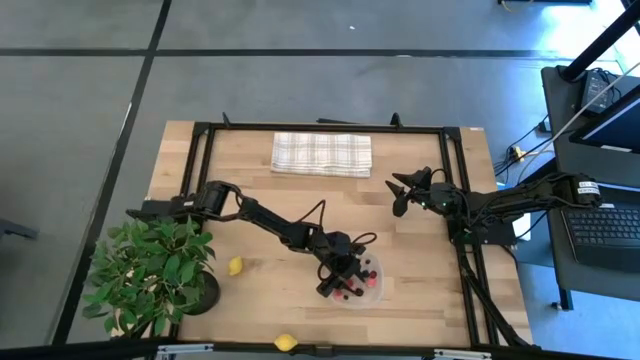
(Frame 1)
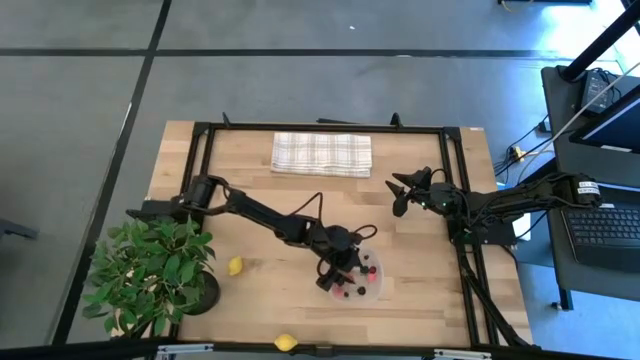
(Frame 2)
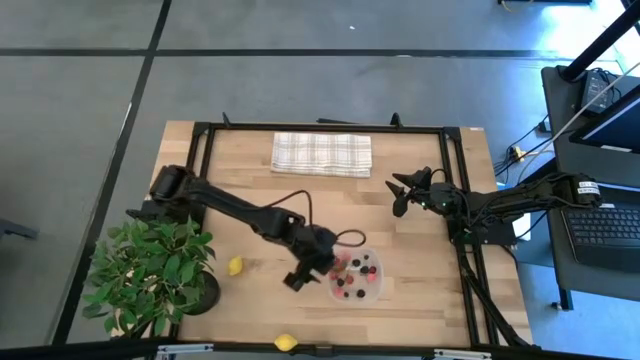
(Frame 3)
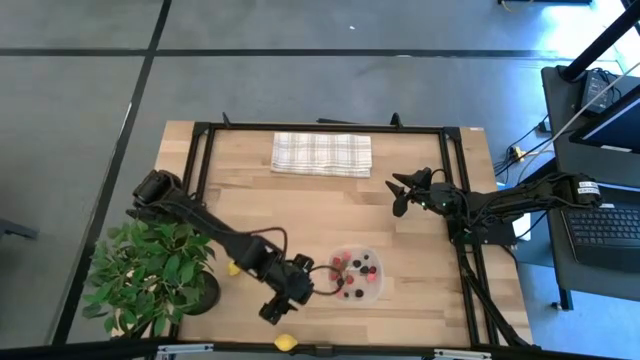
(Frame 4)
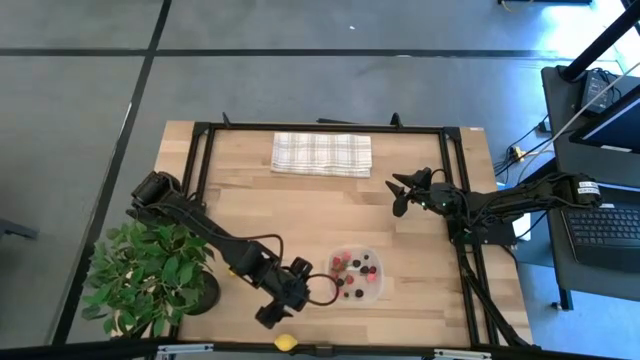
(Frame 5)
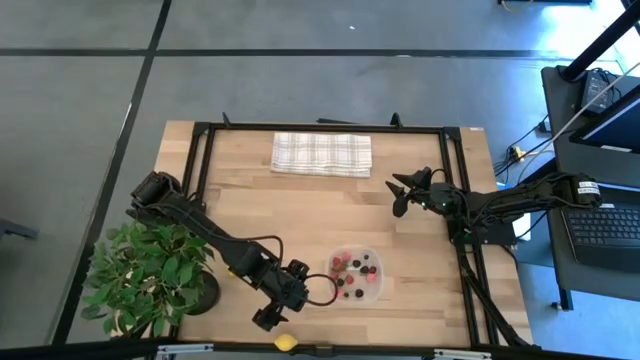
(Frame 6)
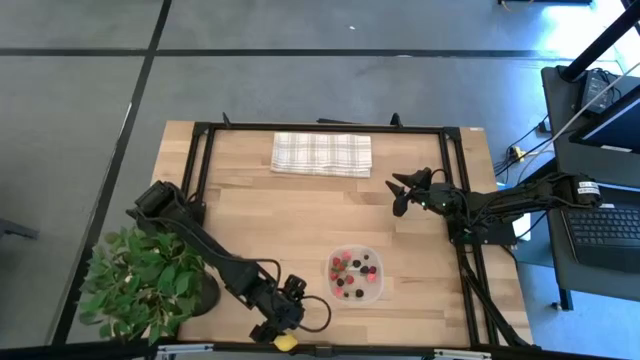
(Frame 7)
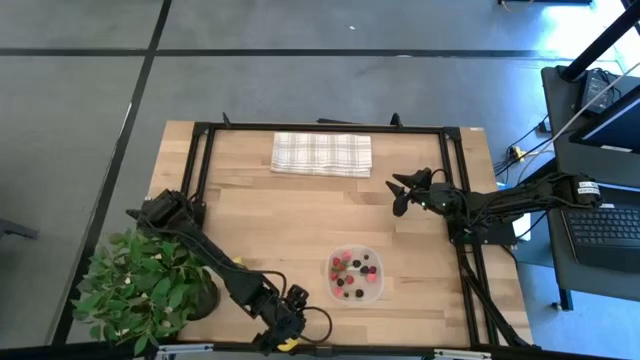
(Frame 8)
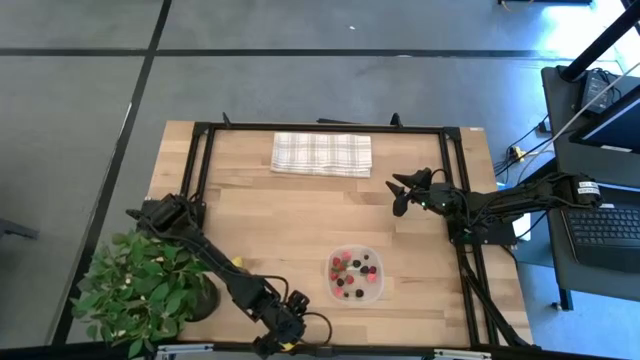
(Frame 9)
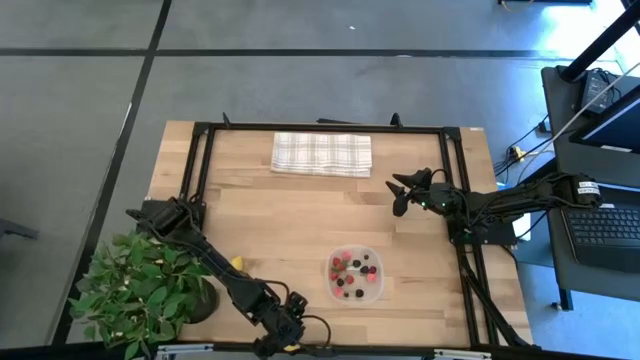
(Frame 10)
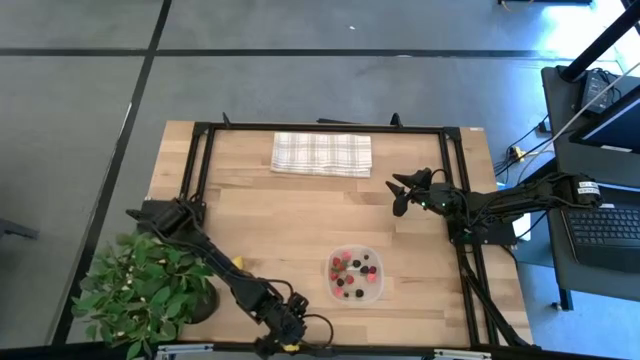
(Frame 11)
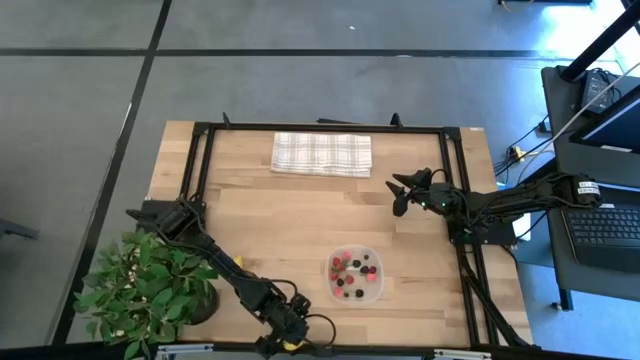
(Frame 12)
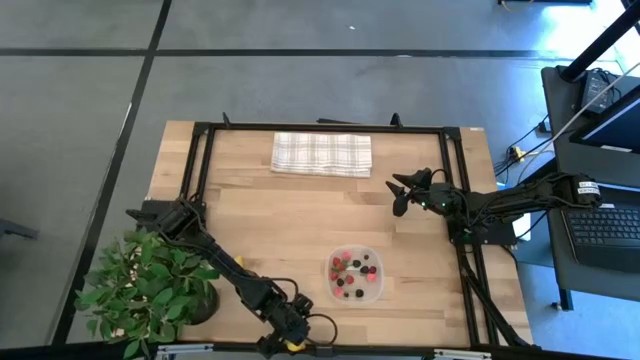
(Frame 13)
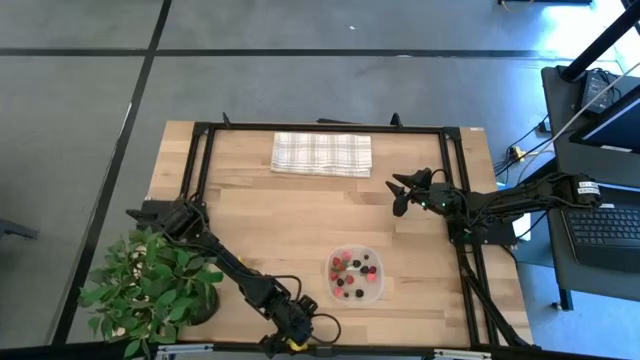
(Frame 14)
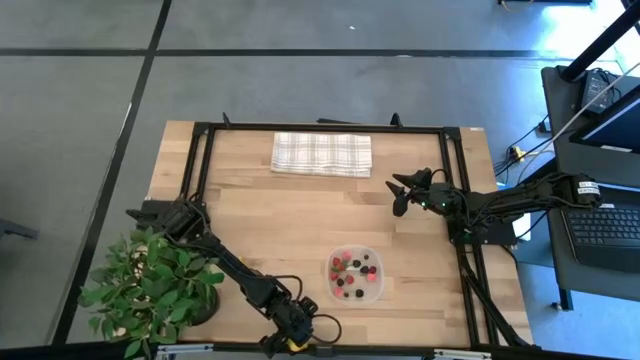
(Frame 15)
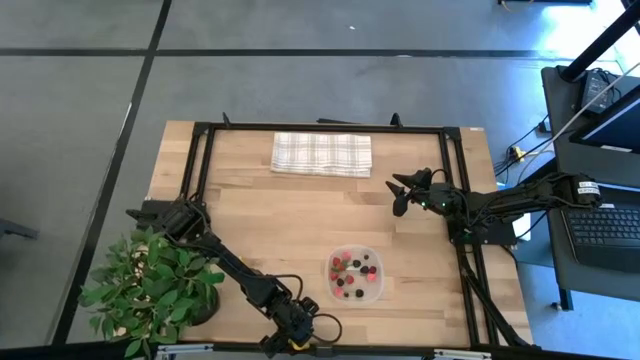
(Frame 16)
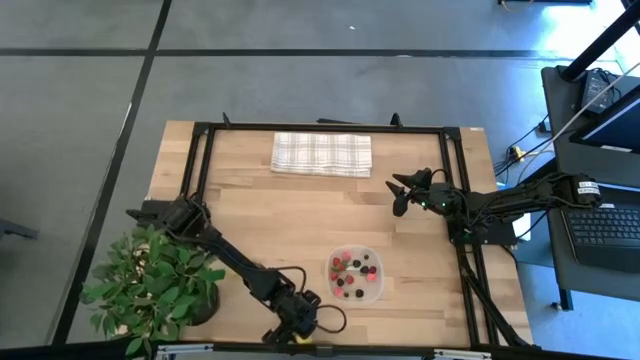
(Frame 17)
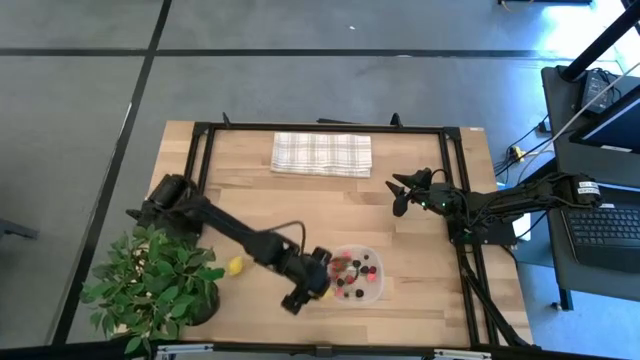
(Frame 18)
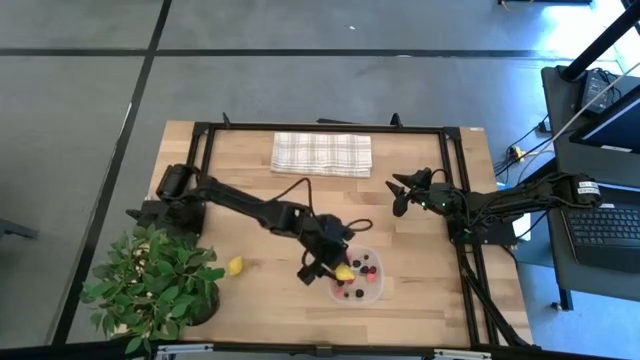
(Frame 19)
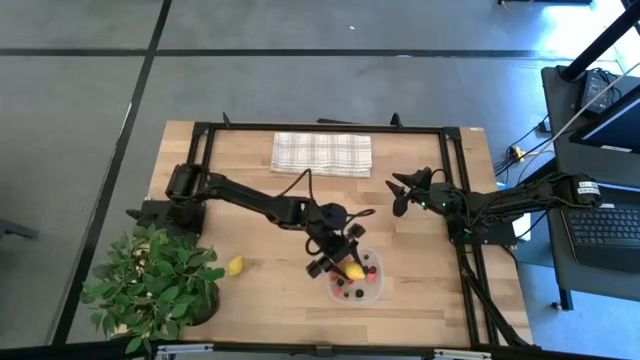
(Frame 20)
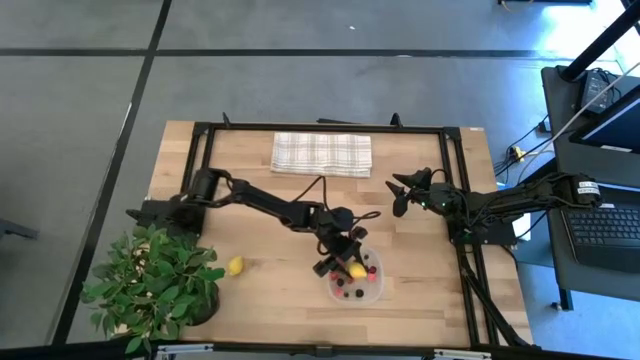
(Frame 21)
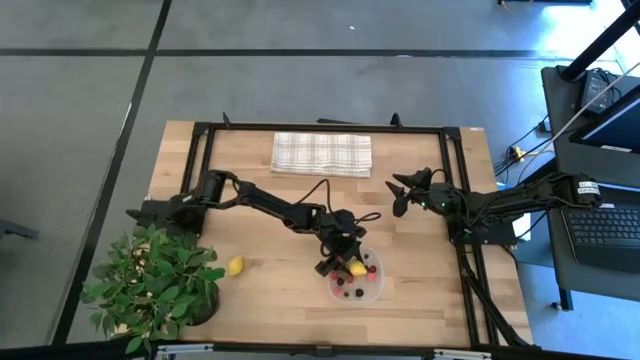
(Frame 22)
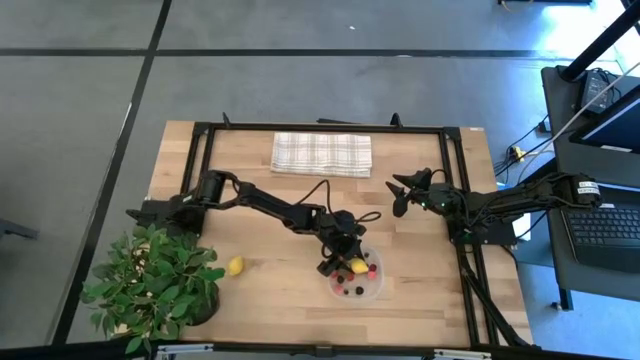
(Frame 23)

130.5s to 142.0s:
Task: Pick and placing Produce into tupperware
Put the bottom yellow lemon into the transparent bin

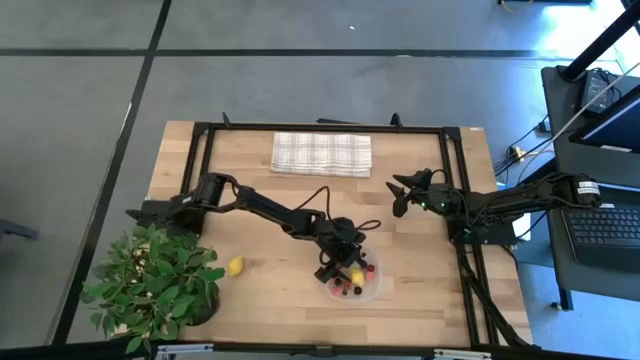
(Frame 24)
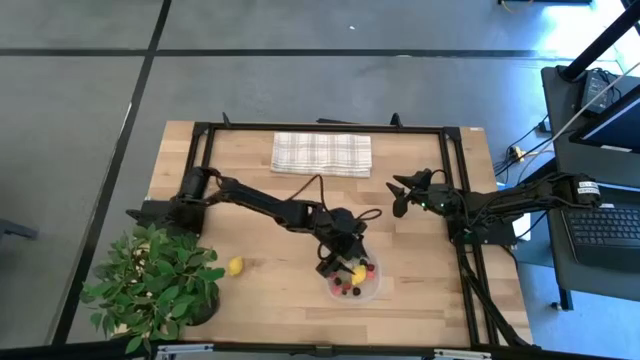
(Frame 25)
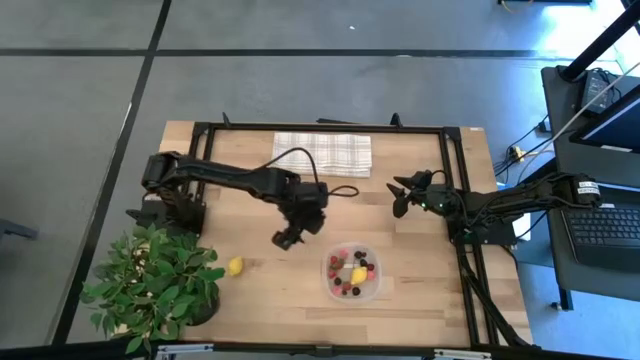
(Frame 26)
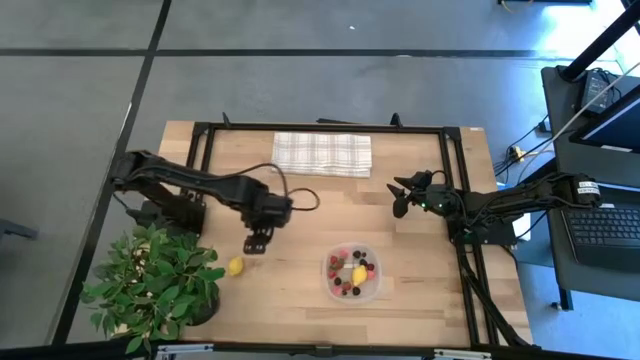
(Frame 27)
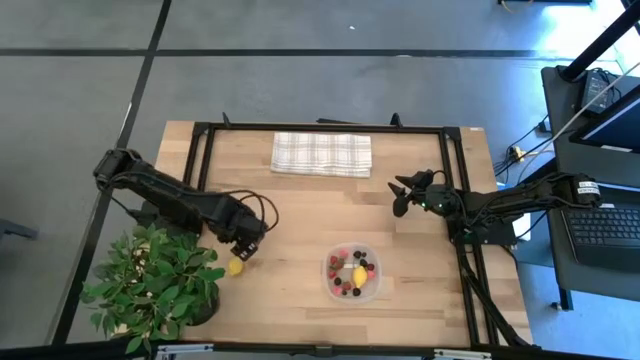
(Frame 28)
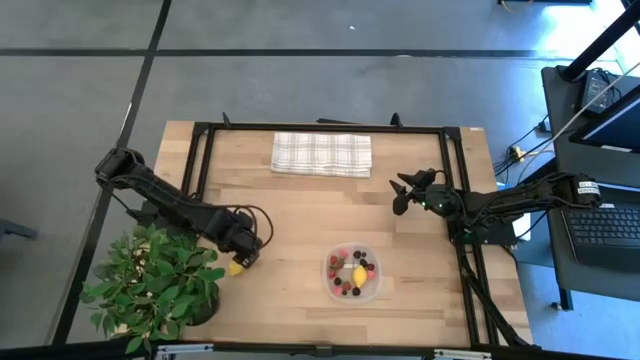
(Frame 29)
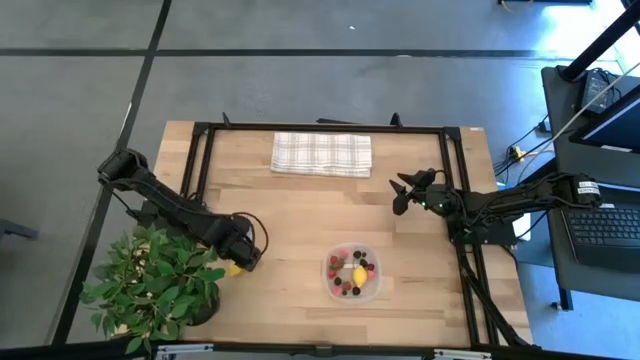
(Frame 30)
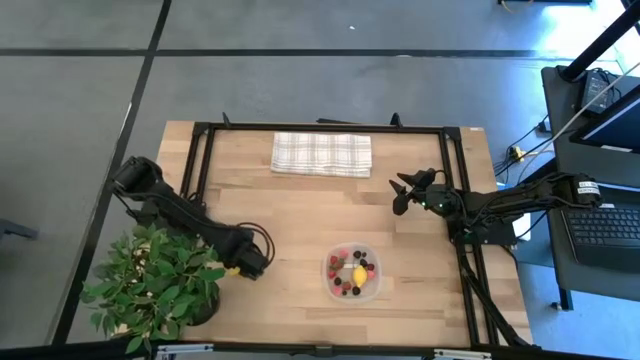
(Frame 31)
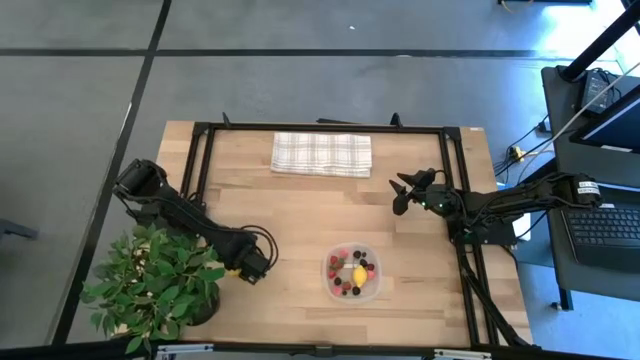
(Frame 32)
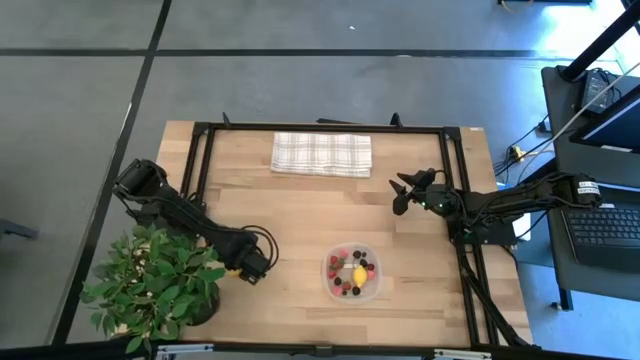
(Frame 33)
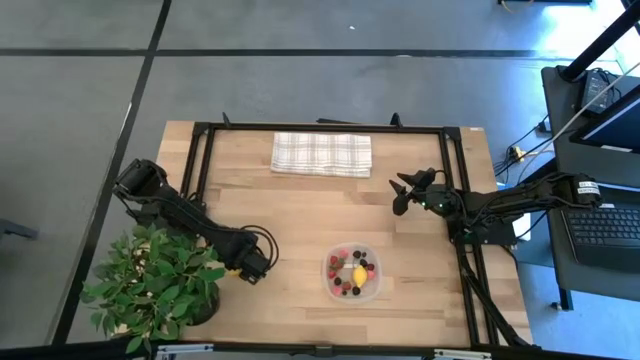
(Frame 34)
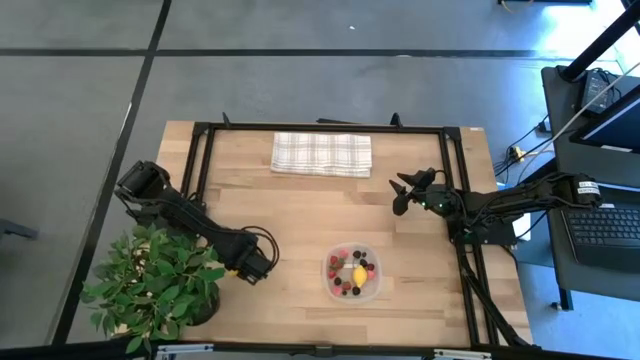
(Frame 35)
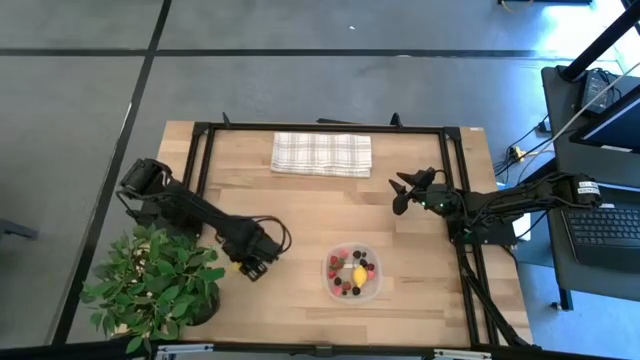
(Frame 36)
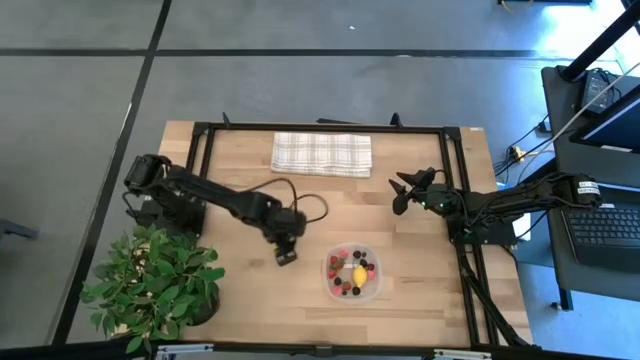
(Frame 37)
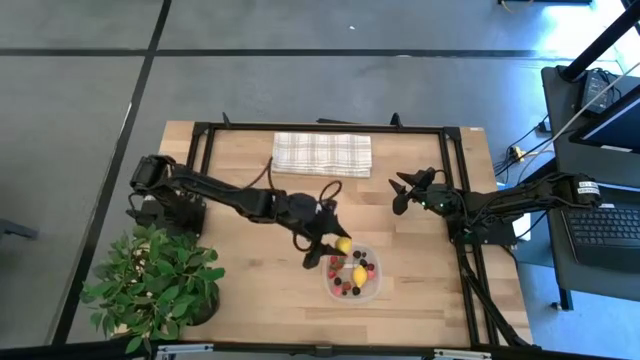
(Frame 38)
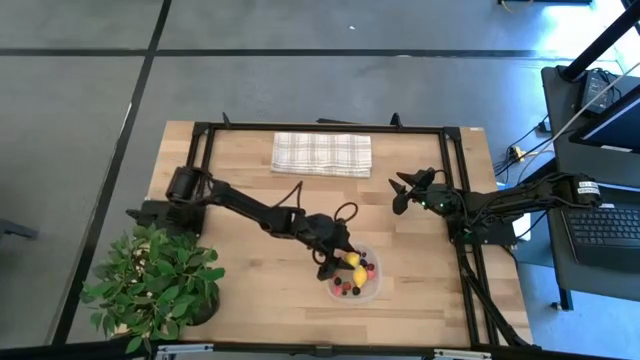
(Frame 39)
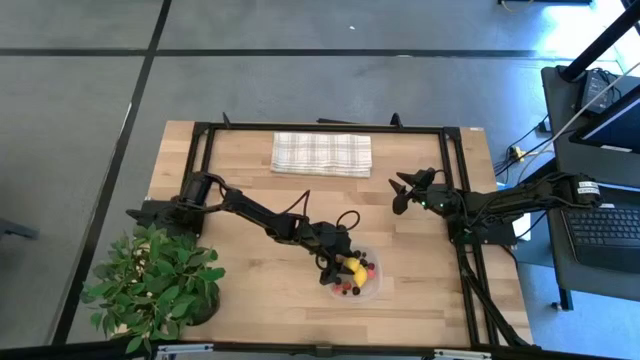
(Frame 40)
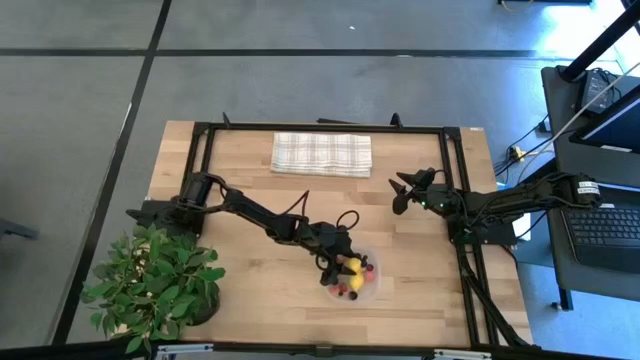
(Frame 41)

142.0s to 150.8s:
Put the yellow lemon into the transparent bin
